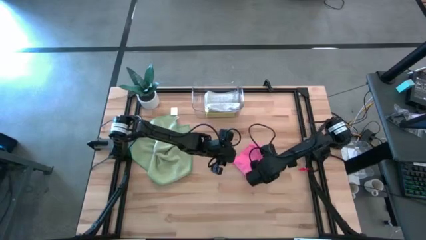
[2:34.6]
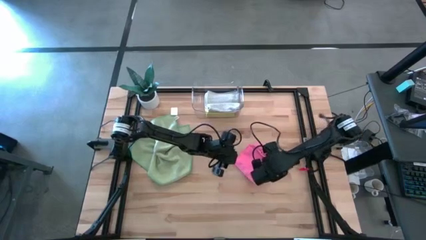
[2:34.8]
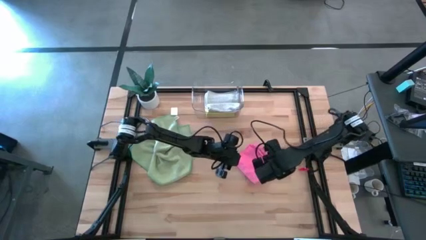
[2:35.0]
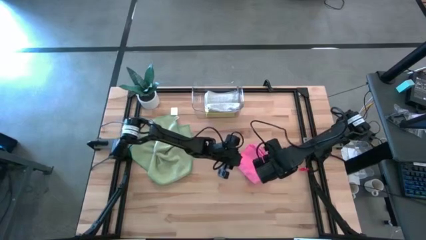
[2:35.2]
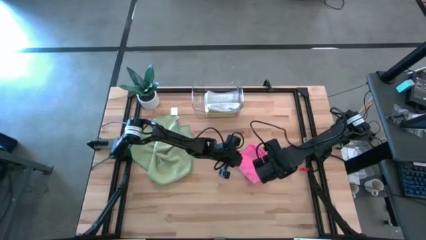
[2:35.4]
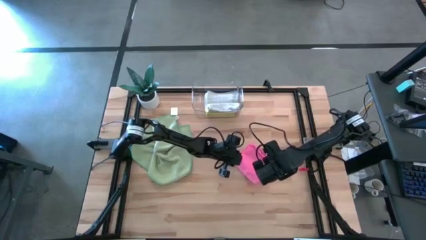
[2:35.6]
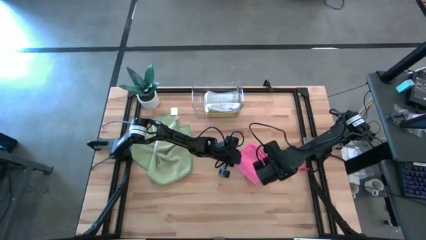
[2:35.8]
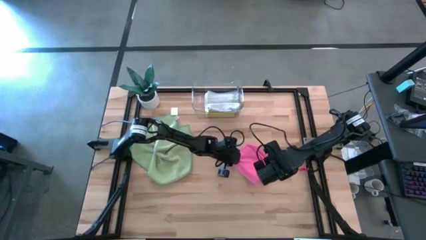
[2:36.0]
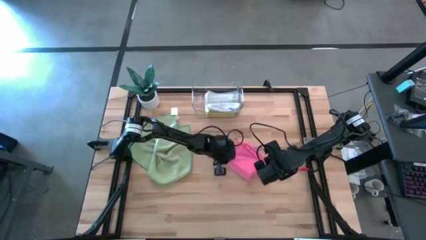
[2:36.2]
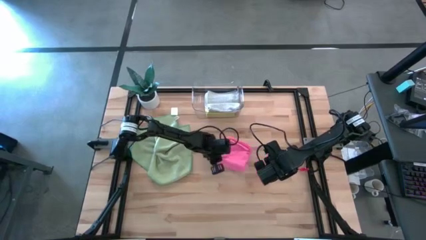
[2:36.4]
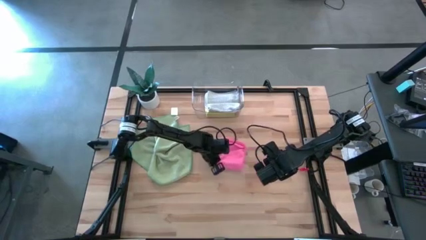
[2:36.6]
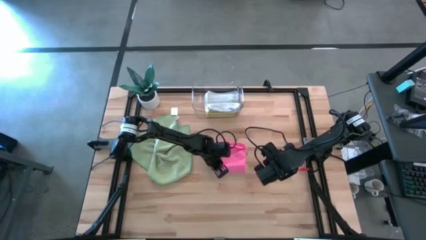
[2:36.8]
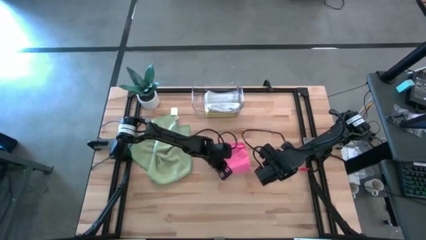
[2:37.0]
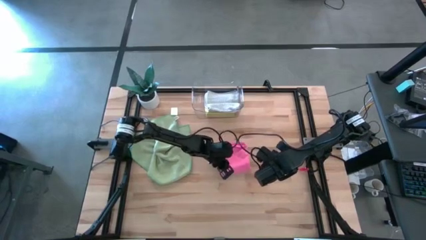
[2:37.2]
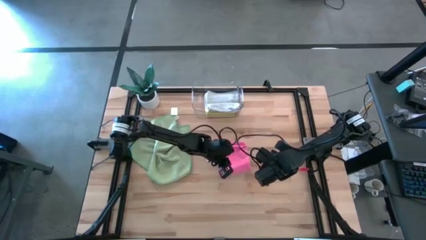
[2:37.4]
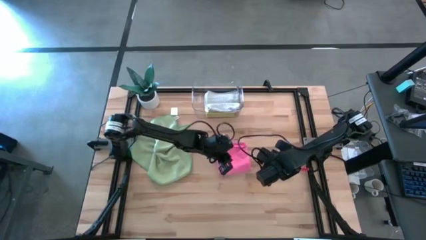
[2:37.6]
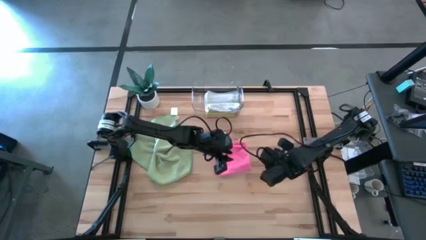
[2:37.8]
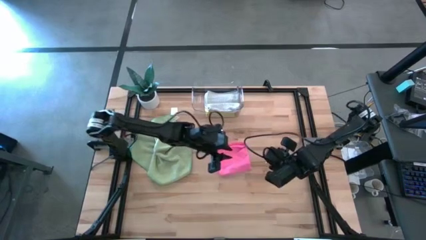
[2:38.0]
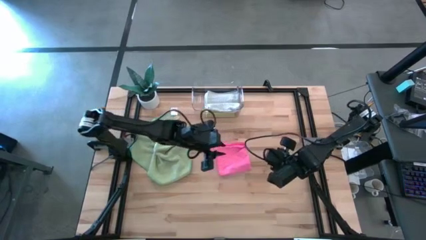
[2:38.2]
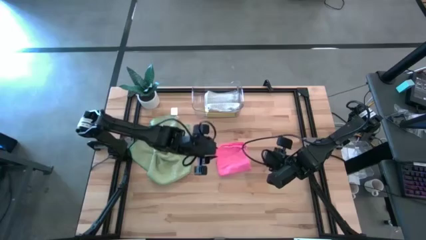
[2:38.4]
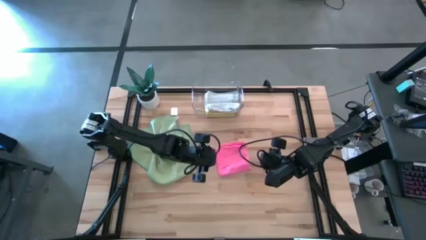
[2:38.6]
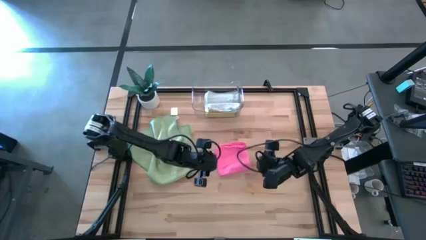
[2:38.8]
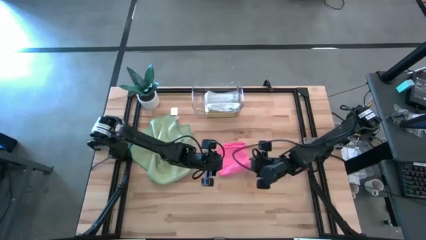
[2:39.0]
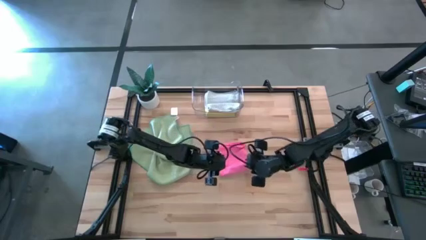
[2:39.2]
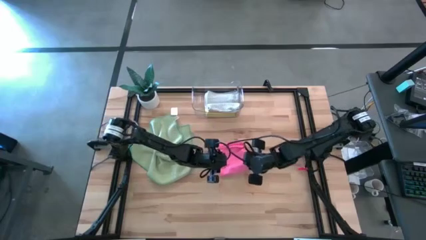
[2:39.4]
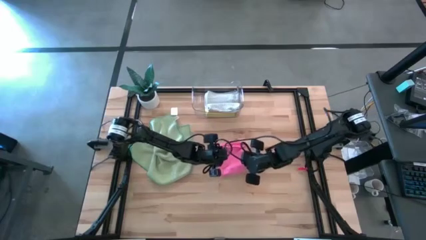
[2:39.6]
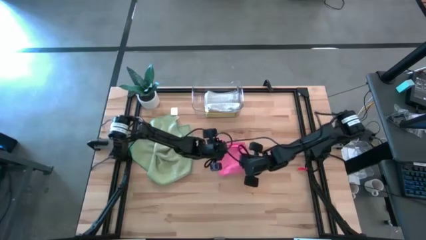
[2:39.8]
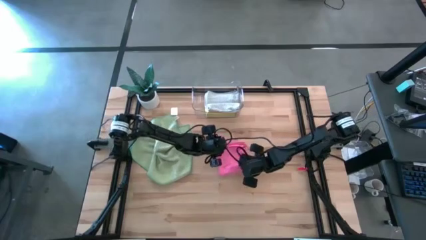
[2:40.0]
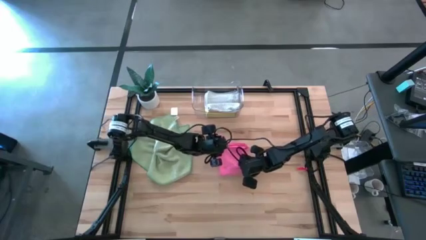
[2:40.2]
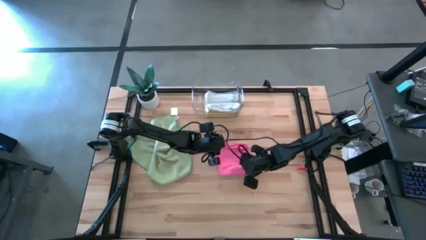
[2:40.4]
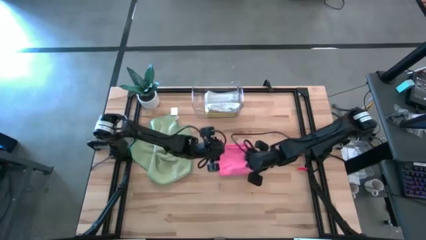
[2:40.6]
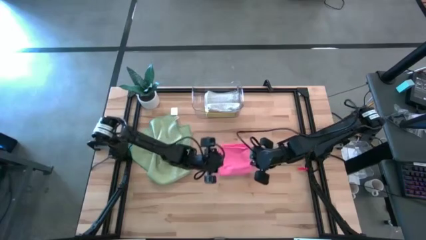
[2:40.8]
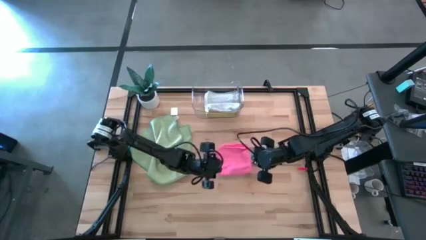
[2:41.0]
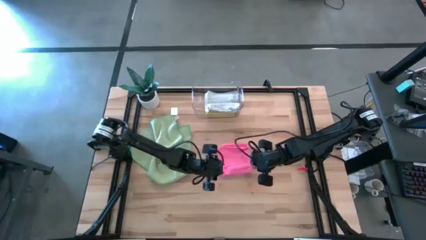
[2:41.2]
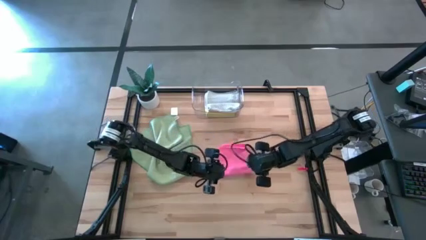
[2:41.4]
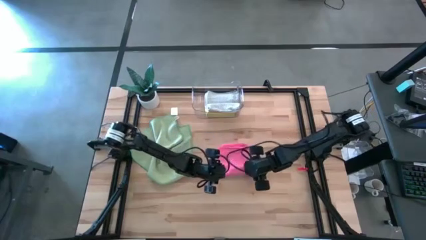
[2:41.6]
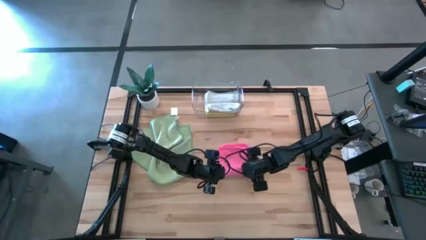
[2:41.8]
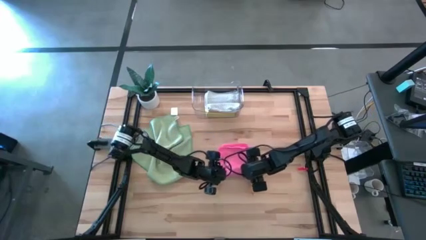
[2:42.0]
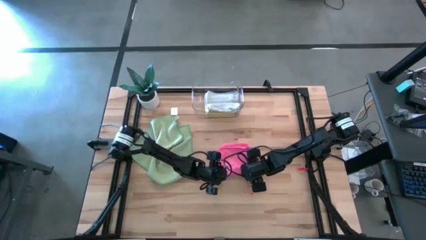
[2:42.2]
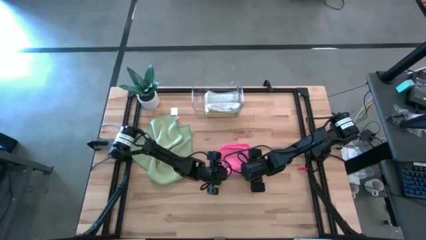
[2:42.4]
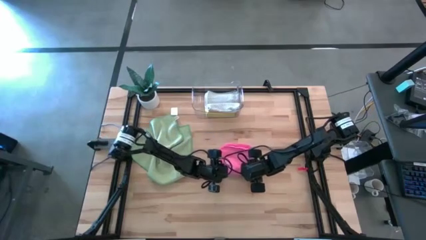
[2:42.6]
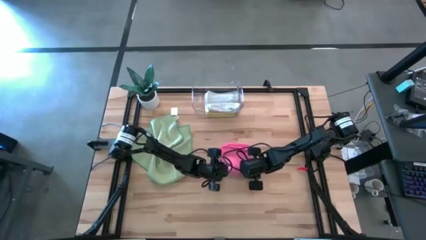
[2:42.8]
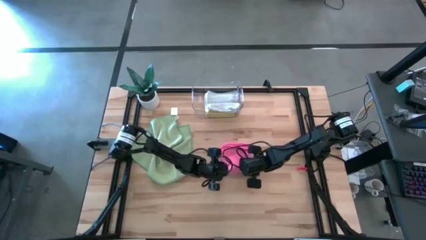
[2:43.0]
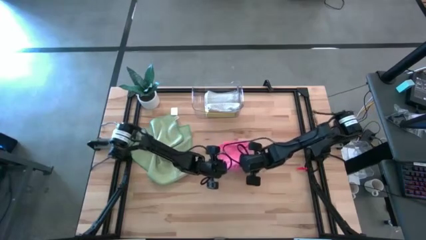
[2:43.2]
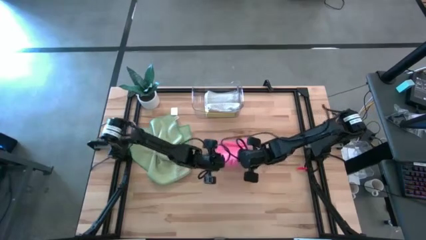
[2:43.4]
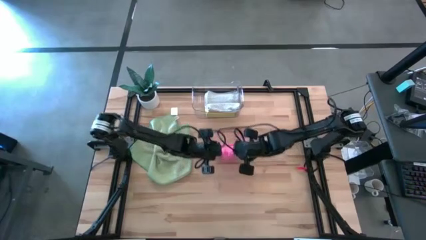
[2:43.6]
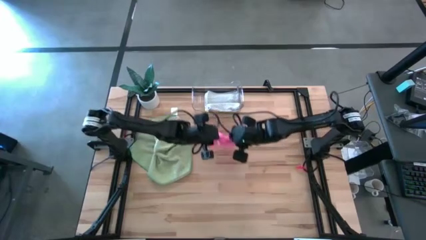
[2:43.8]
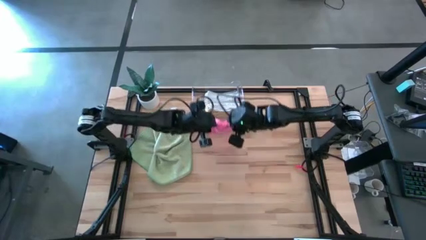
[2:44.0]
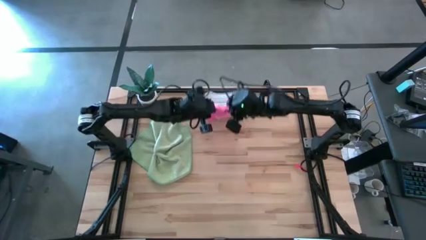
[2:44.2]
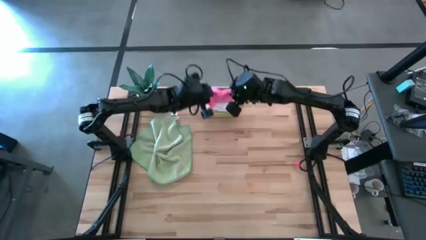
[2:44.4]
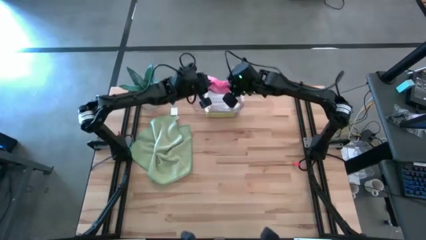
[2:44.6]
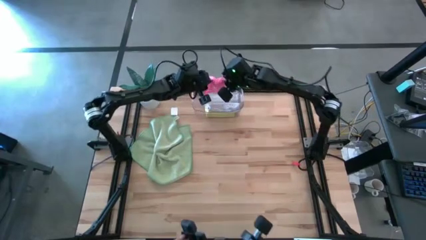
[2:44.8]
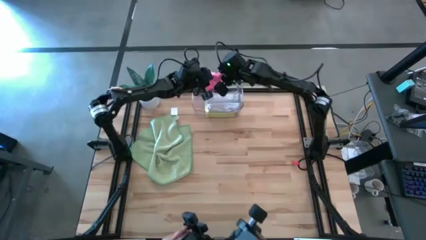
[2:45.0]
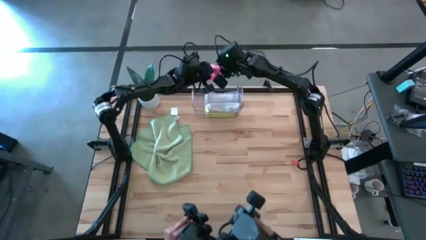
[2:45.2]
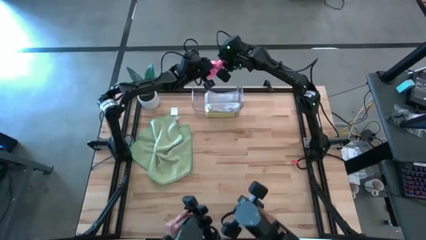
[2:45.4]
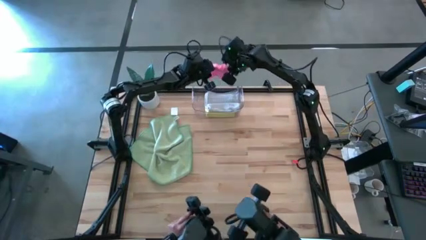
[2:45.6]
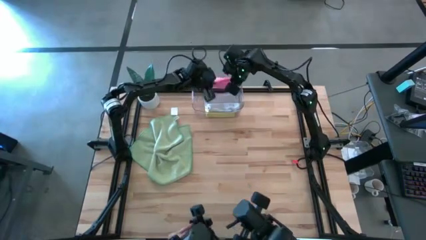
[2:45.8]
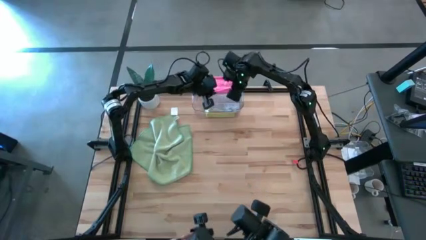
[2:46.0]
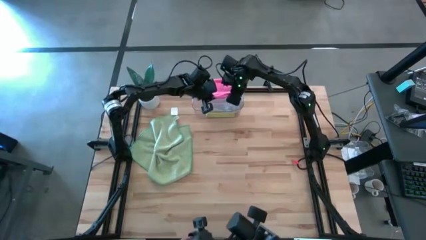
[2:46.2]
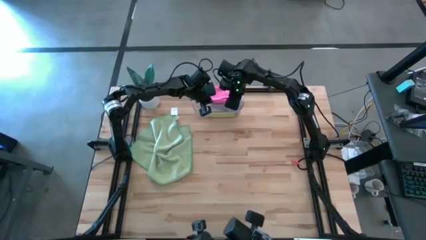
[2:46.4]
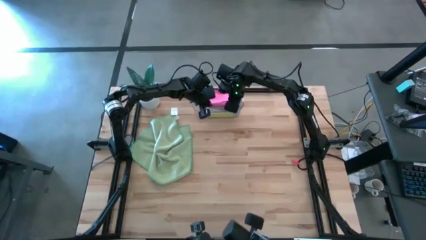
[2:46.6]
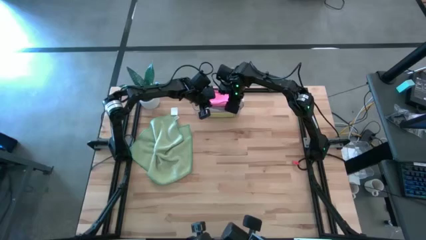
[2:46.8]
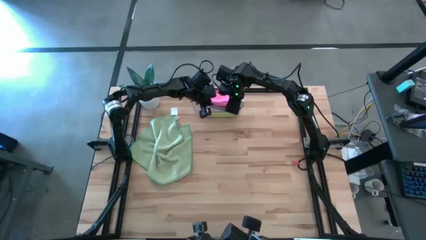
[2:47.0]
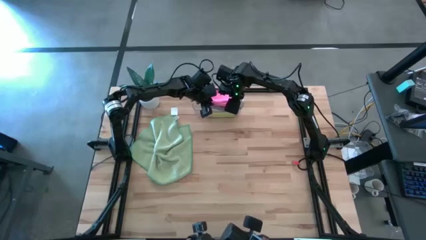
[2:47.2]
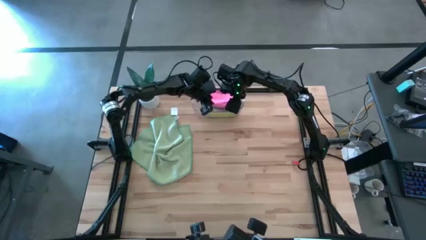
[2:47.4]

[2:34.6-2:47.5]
Task: Fold microfiber towels
Put the folded pink microfiber cloth into the transparent bin

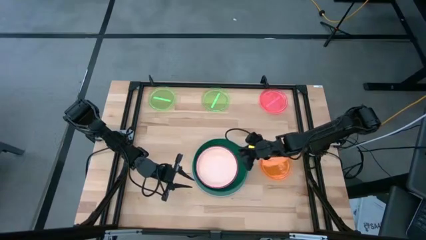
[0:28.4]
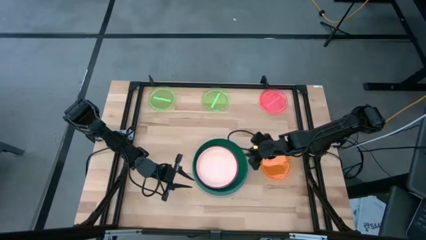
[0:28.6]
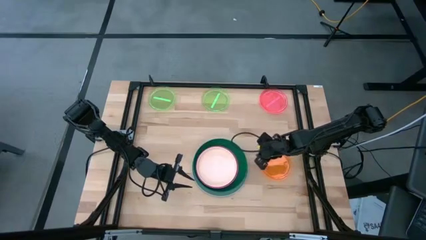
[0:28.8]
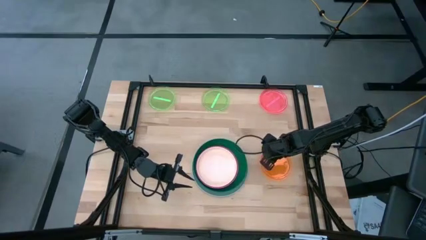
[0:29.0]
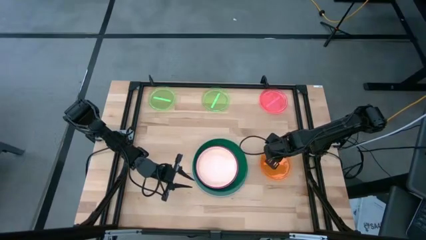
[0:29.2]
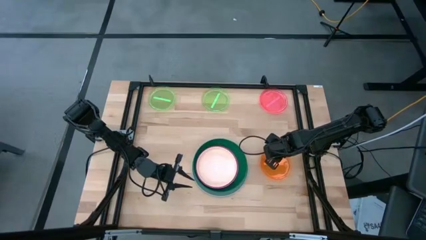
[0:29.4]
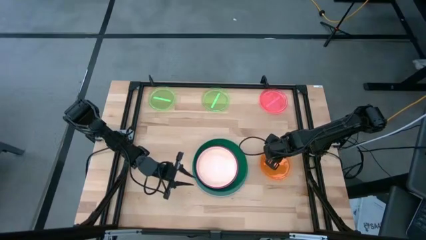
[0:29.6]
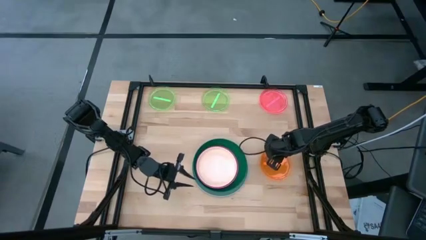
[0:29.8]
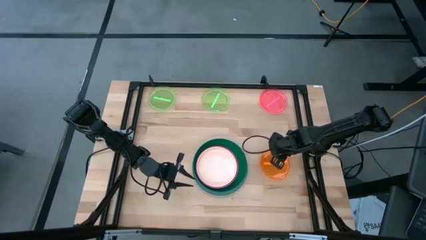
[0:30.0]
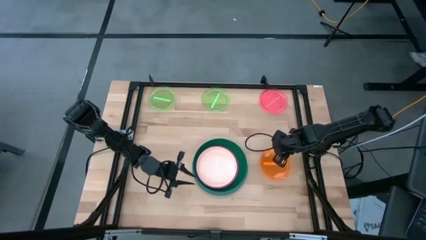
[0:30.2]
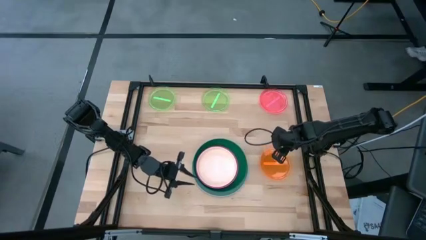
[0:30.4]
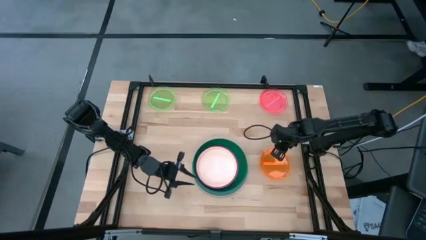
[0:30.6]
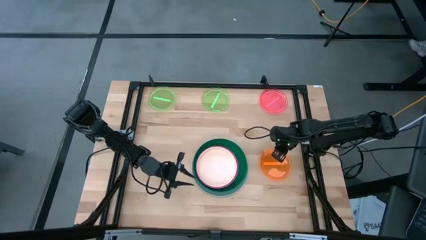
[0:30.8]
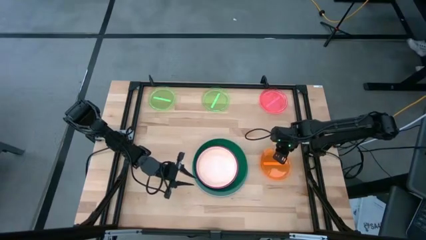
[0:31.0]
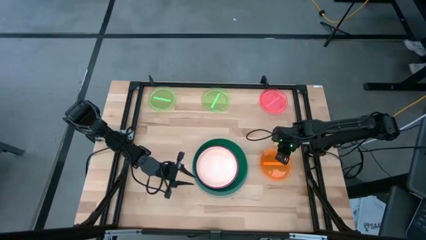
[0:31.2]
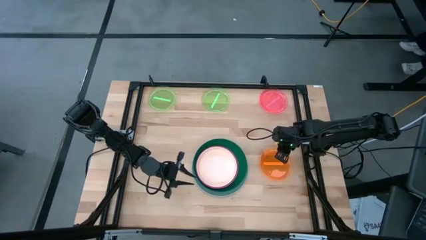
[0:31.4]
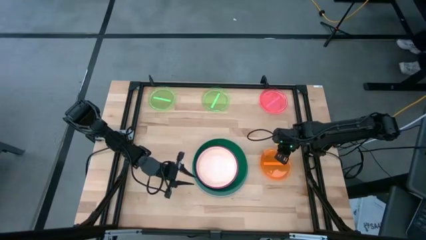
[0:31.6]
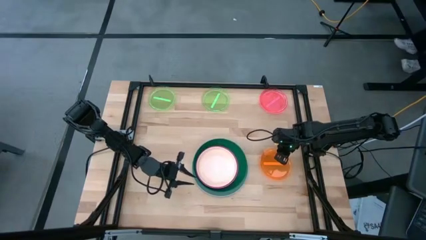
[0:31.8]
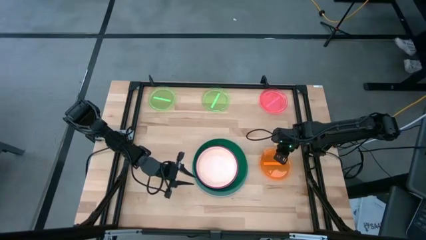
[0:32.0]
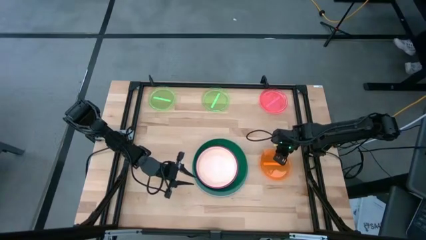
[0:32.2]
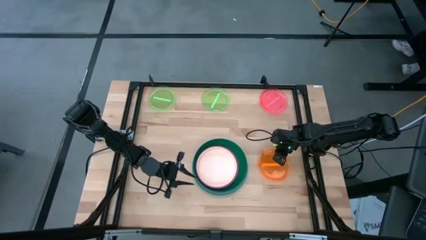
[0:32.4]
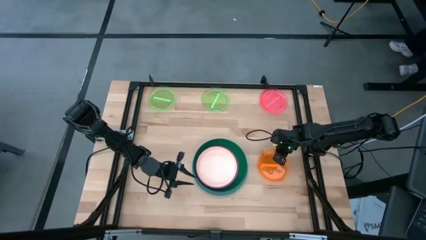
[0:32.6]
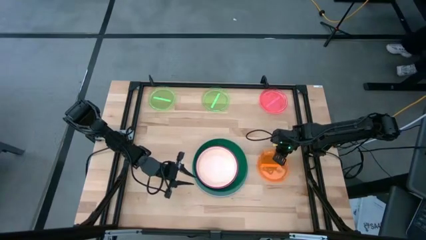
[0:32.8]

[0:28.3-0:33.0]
Task: Stack plastic plates
Stack the orange transparent plate on top of the light brown plate
